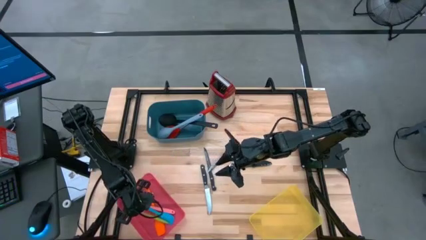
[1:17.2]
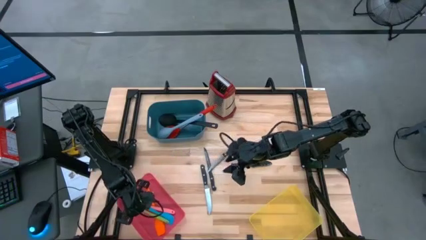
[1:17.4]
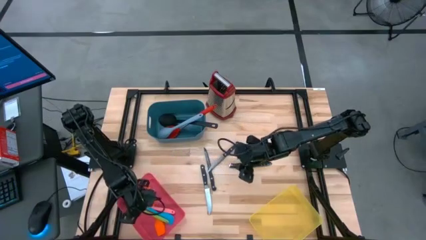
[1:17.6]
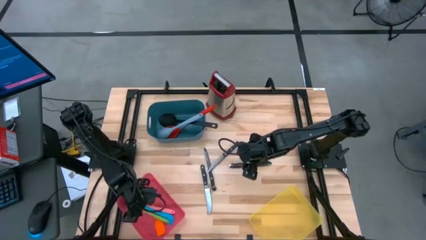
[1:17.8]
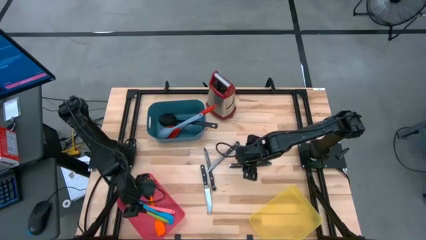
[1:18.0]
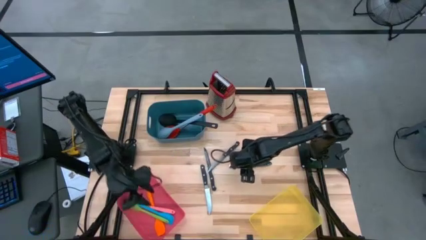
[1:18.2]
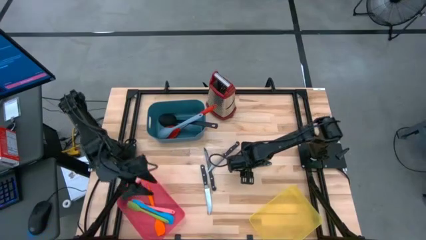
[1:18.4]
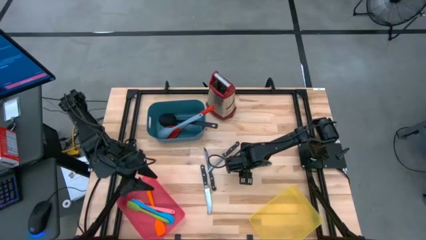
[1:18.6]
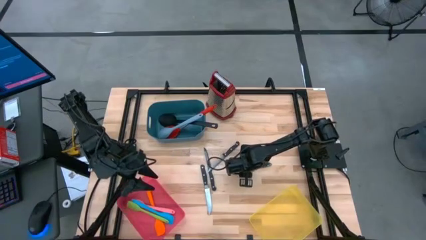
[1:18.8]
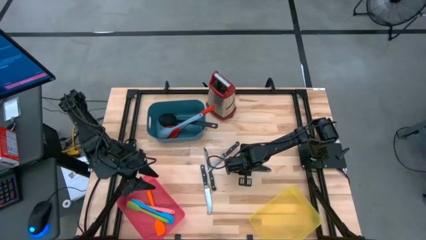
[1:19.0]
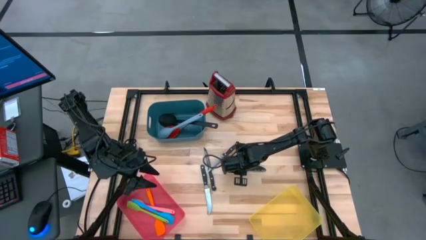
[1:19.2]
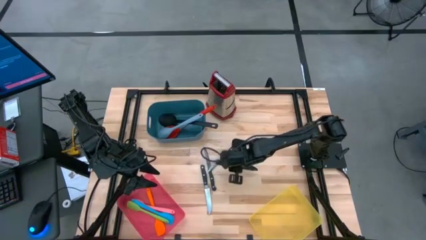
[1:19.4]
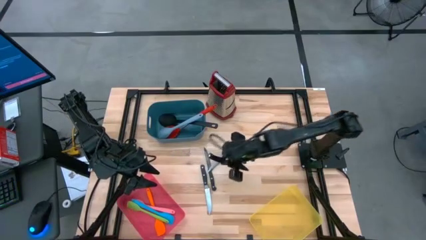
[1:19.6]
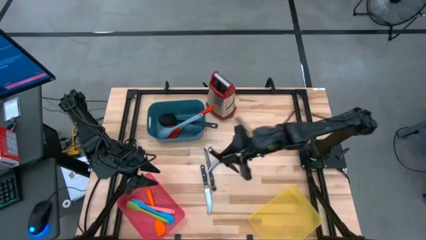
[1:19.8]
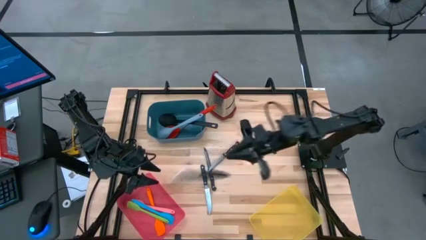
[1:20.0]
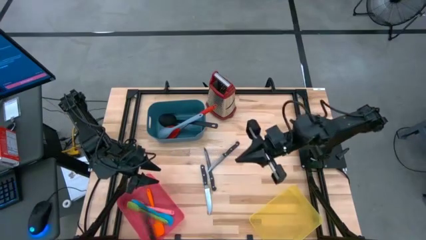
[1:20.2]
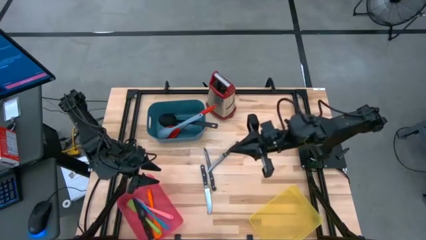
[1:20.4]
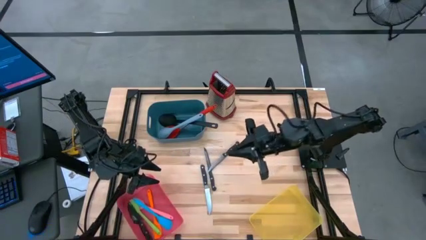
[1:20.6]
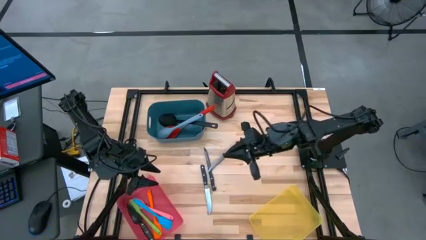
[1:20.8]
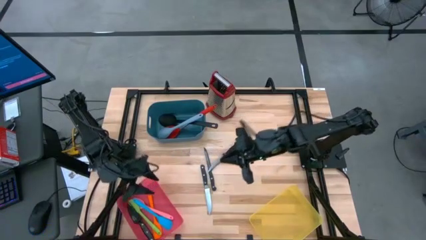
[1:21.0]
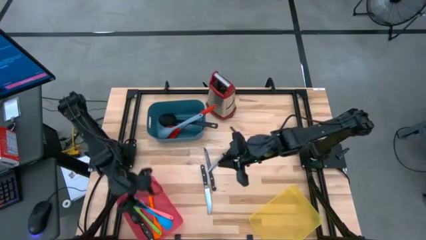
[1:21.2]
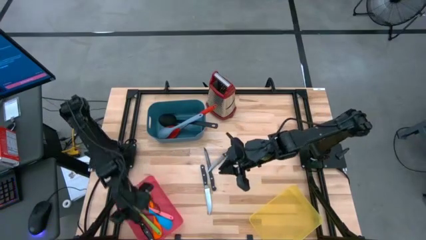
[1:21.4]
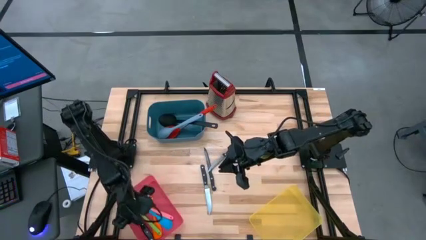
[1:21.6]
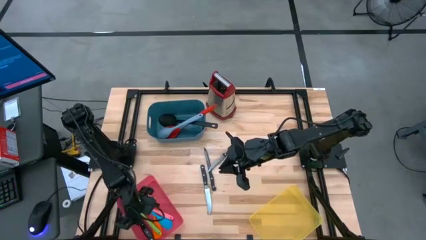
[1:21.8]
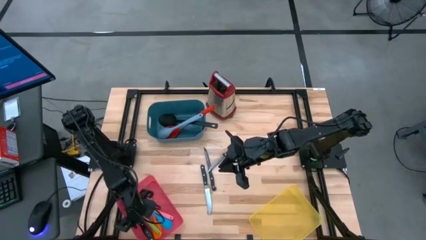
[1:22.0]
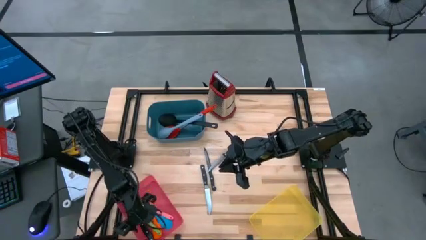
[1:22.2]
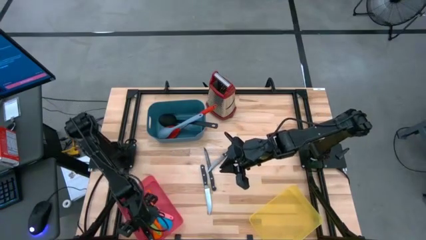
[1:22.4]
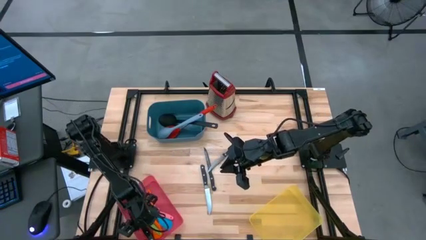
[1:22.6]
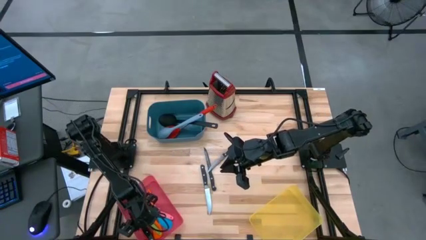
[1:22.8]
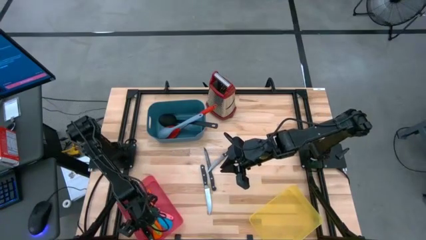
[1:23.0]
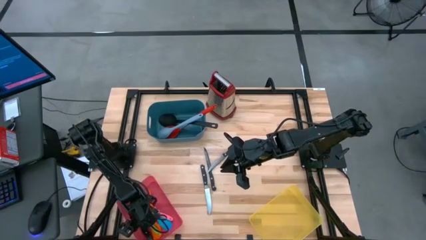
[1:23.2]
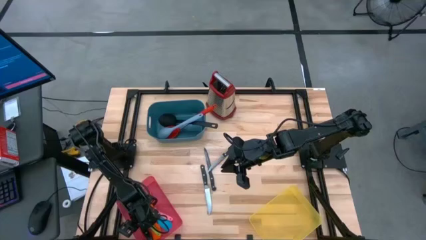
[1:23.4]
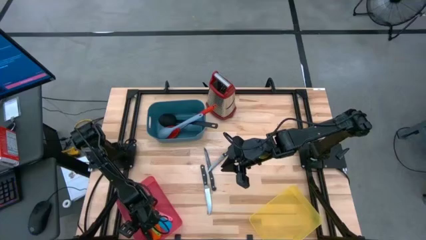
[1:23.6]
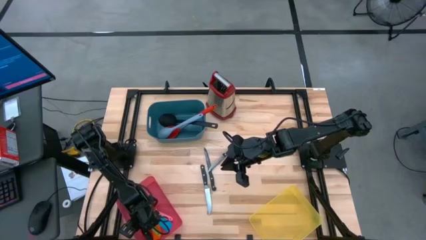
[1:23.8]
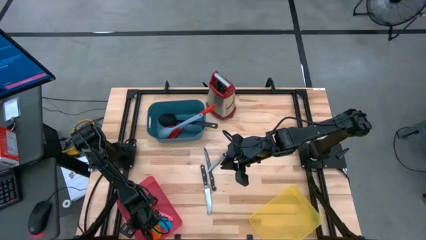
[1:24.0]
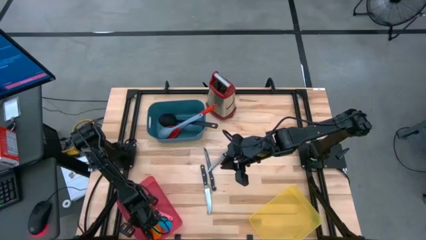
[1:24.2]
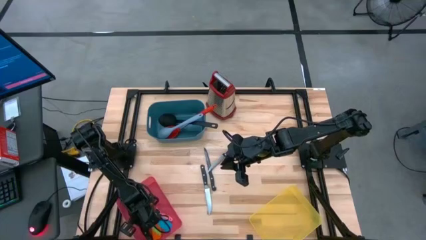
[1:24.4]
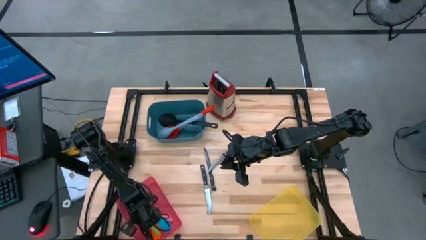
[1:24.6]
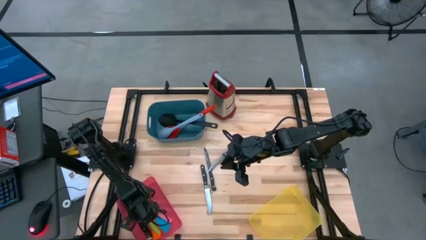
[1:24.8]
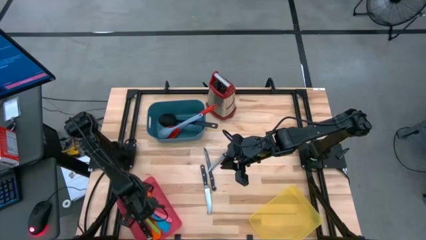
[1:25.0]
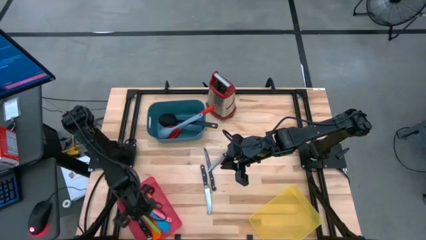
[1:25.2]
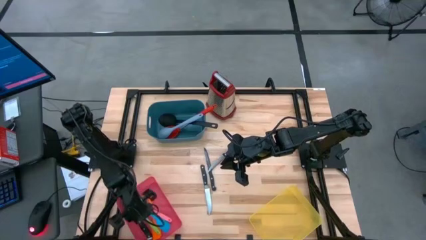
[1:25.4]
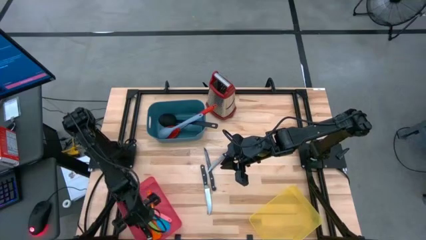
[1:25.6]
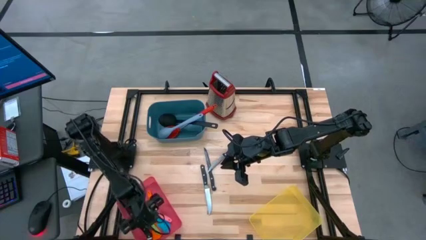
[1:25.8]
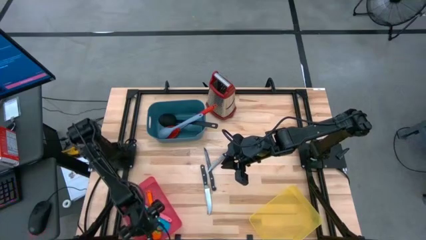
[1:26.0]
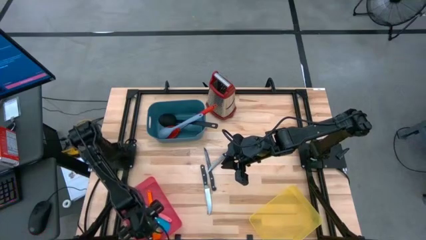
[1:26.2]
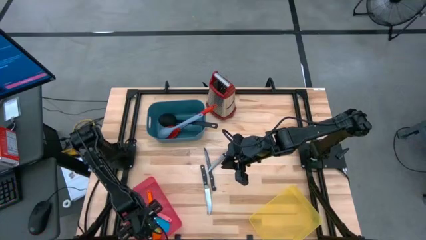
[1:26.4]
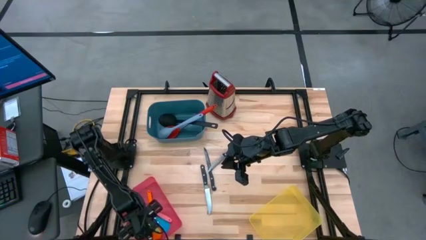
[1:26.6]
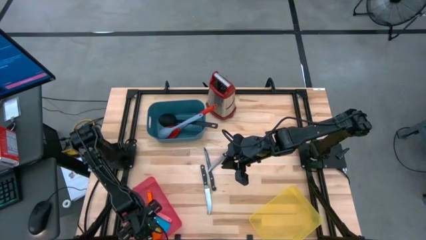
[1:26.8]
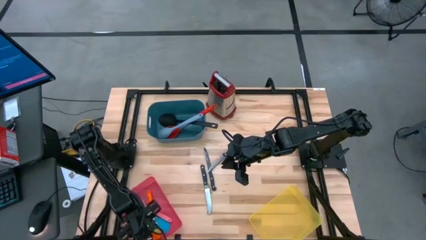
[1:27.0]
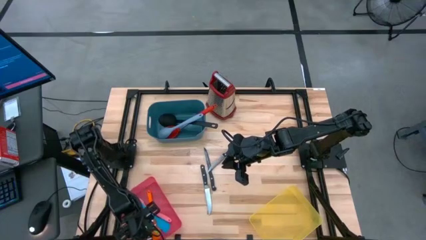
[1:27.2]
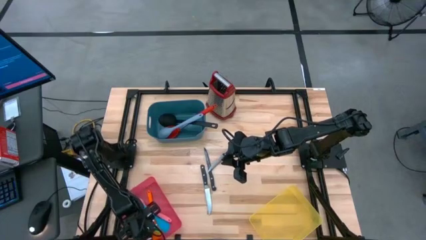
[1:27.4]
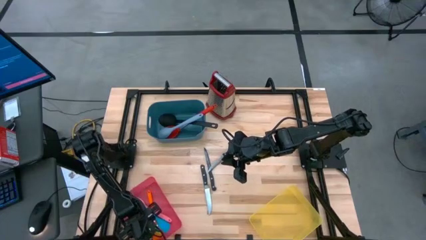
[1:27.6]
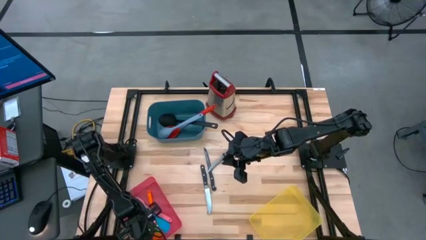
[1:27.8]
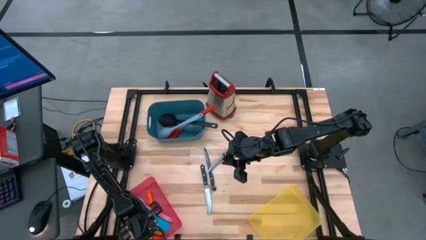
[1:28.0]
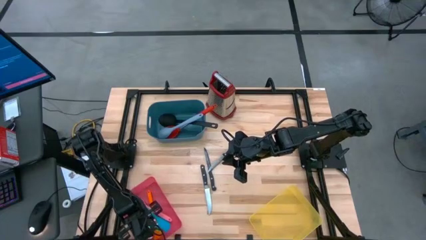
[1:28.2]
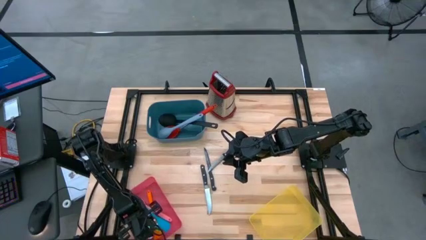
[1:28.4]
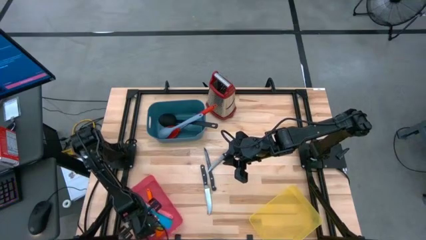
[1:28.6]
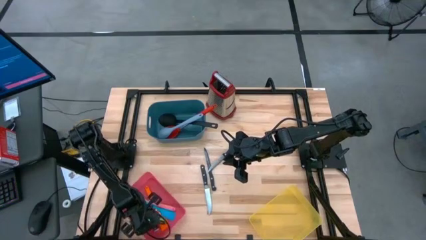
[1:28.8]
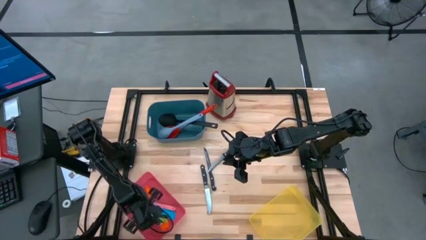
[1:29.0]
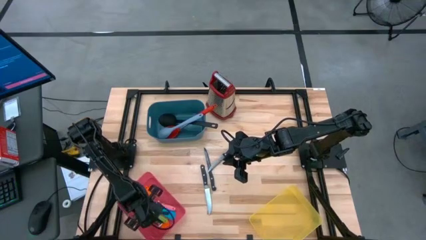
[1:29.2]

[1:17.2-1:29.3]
Task: Pick & Place Kitchen Items
Put the black table knife into the yellow bin

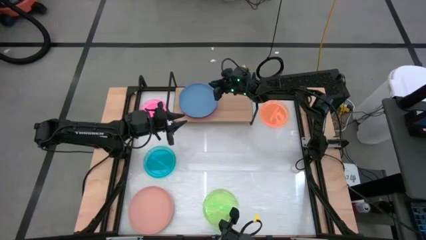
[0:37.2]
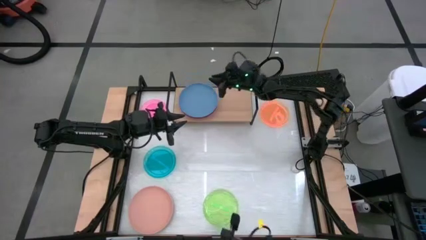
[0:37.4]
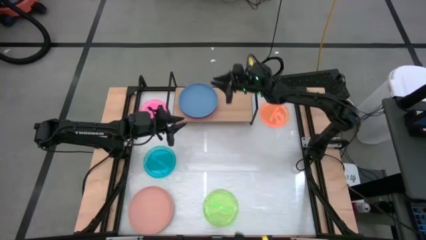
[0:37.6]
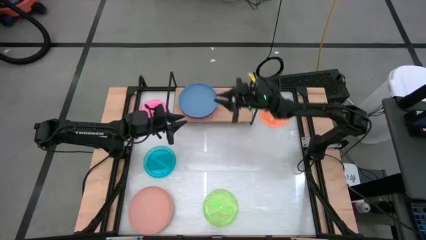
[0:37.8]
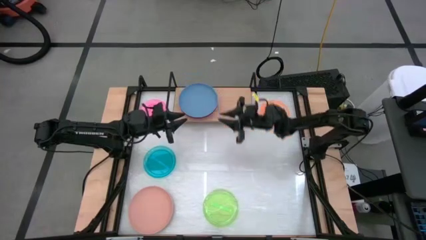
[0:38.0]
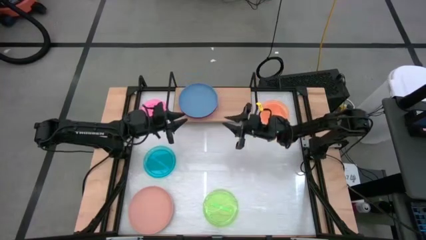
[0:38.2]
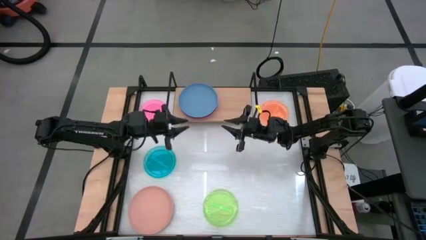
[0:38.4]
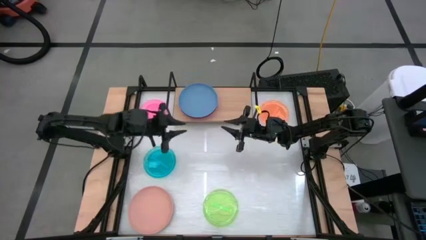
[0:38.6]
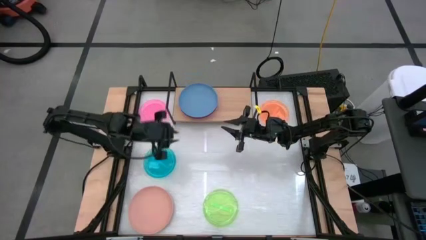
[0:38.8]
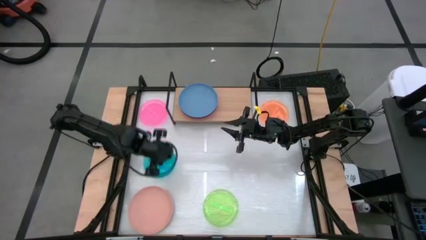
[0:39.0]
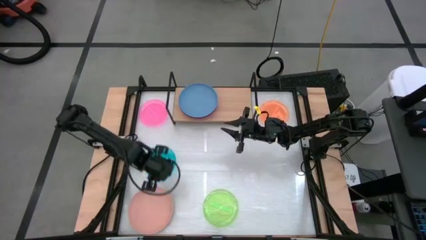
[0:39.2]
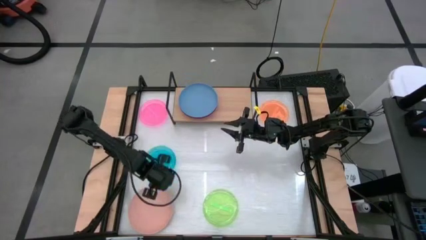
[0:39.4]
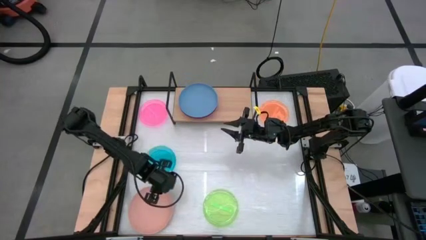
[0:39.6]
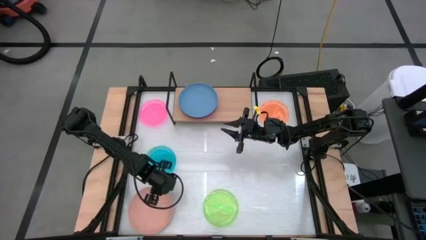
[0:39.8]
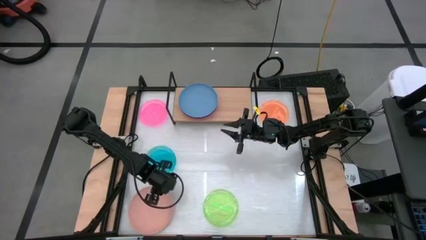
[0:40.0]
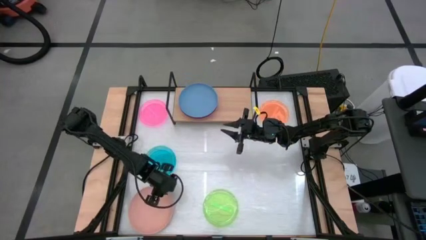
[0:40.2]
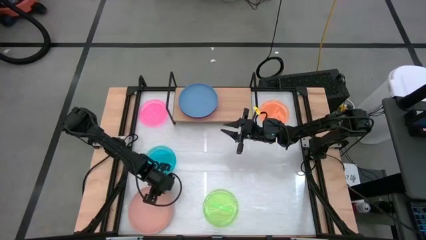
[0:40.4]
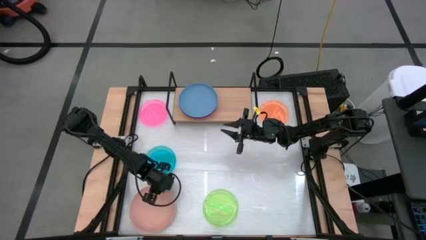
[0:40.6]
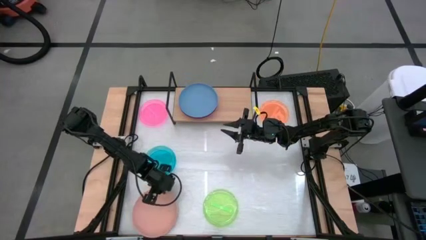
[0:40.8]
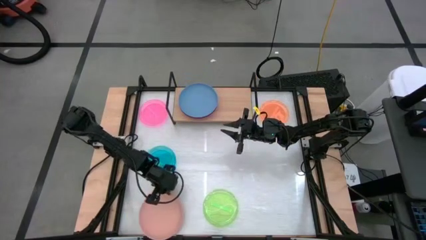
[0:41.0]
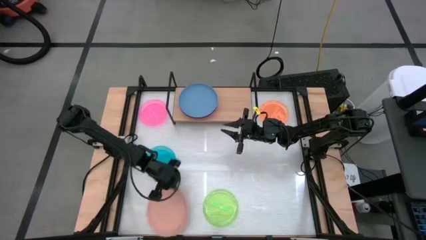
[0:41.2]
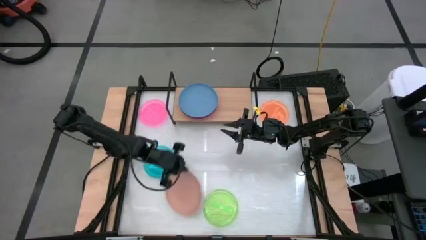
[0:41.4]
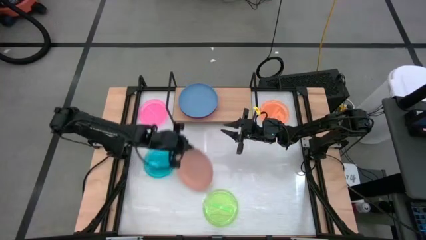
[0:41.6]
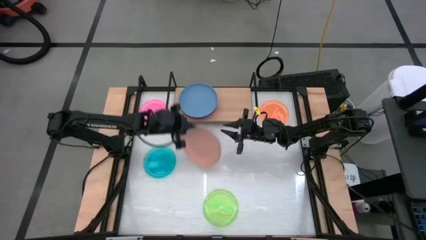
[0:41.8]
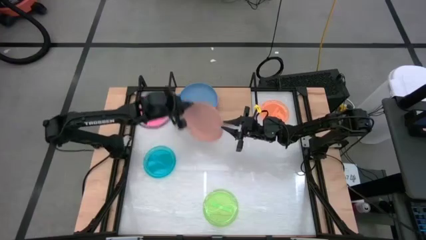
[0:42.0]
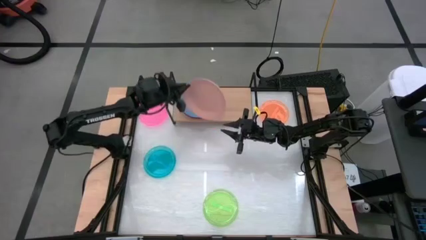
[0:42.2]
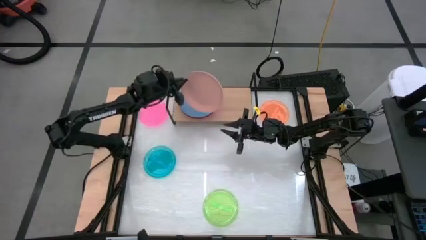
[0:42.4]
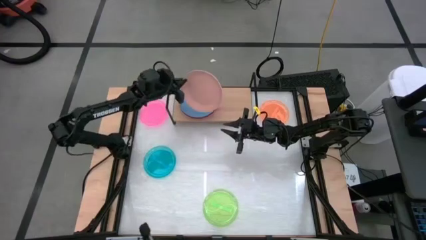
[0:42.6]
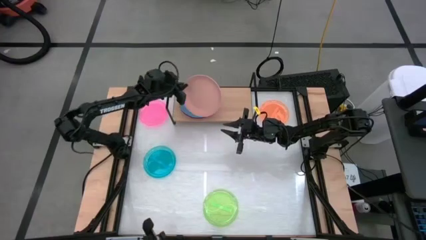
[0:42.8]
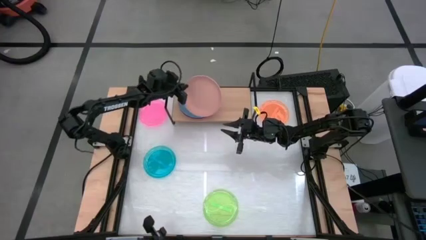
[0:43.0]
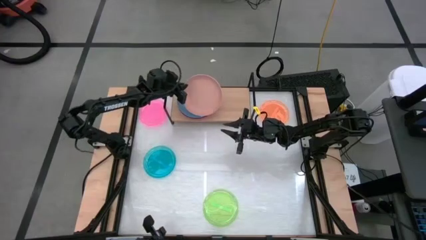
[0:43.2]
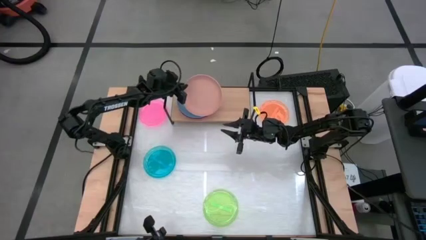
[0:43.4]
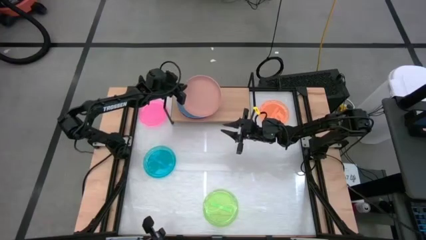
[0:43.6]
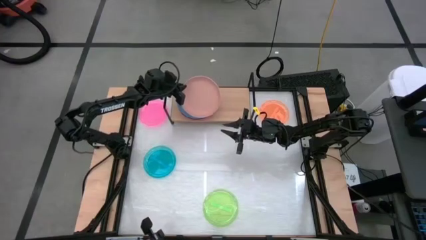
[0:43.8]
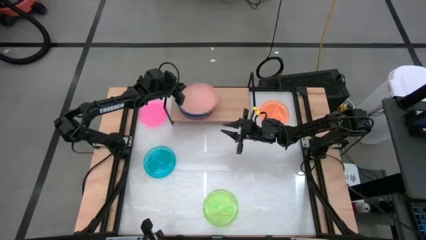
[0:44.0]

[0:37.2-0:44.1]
Task: Place and stack plates onto a shelf
Stack the peach plate on top of the blue plate on the shelf
